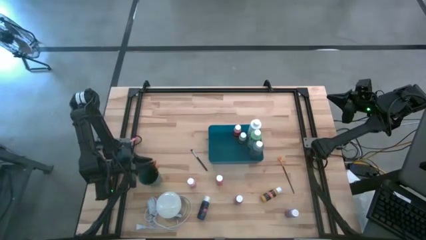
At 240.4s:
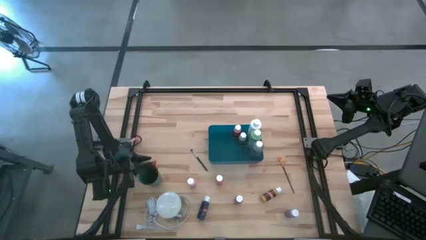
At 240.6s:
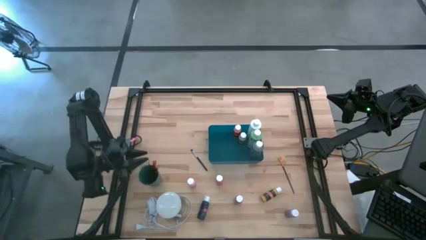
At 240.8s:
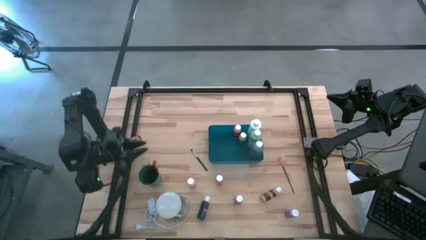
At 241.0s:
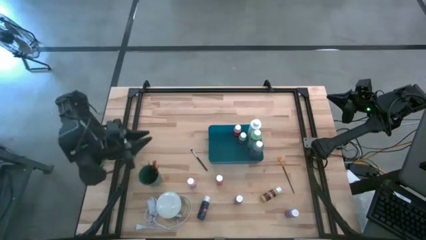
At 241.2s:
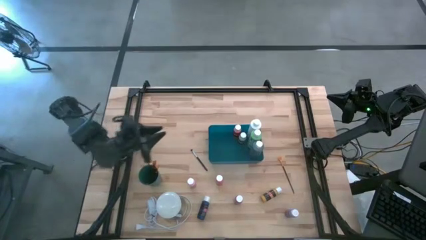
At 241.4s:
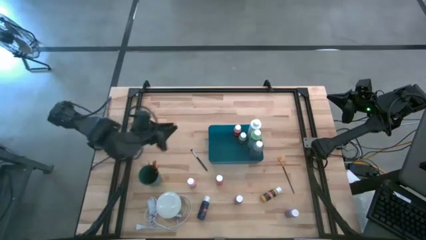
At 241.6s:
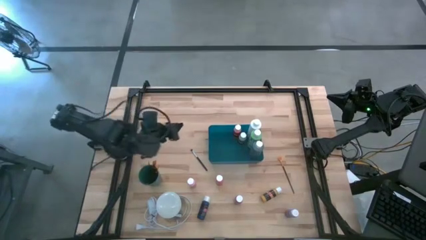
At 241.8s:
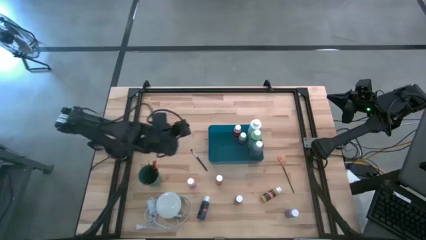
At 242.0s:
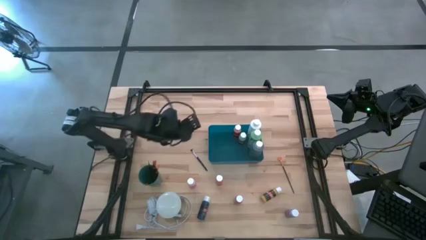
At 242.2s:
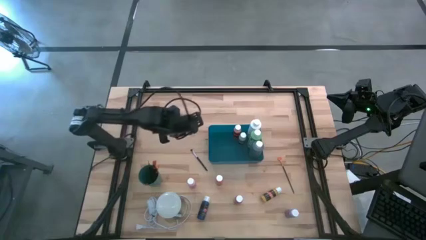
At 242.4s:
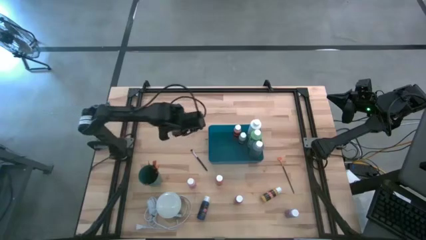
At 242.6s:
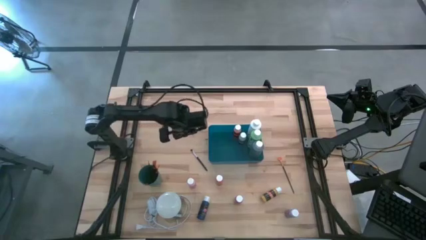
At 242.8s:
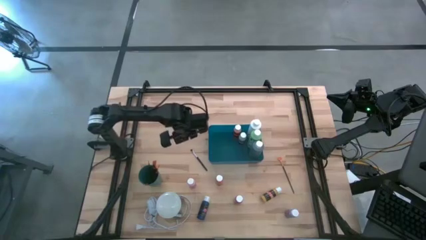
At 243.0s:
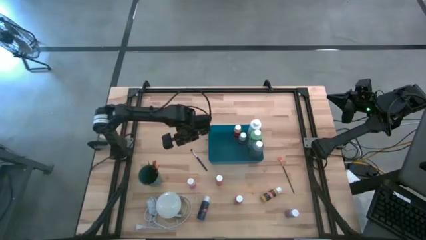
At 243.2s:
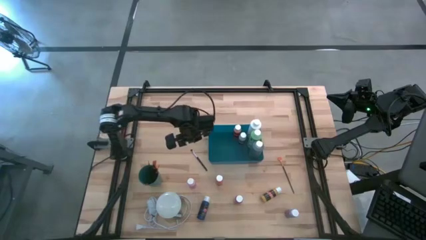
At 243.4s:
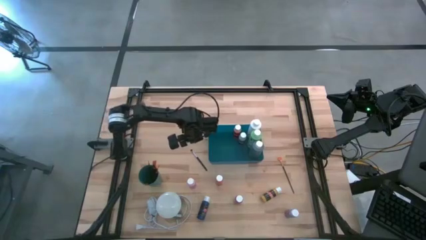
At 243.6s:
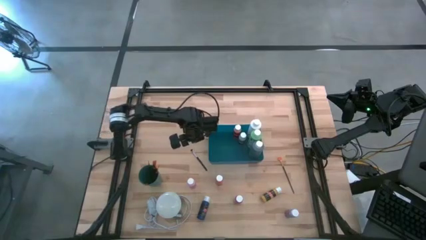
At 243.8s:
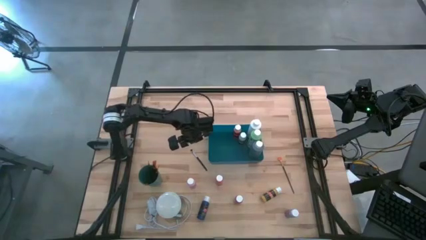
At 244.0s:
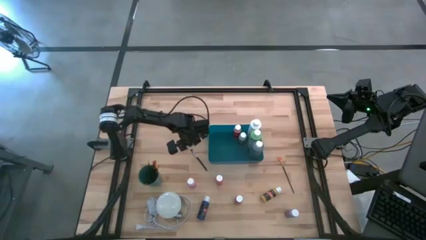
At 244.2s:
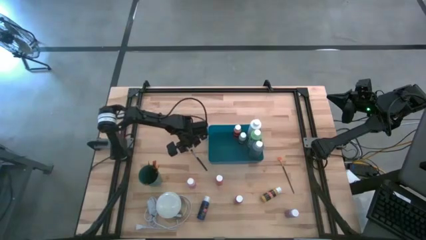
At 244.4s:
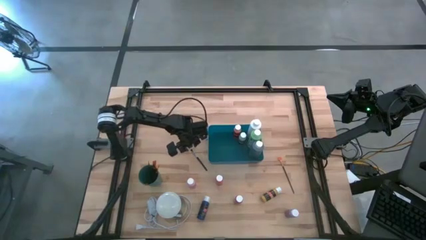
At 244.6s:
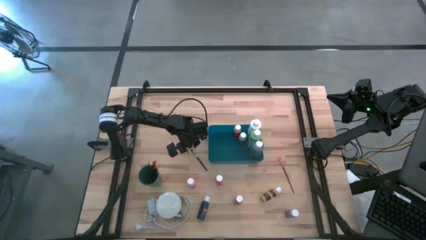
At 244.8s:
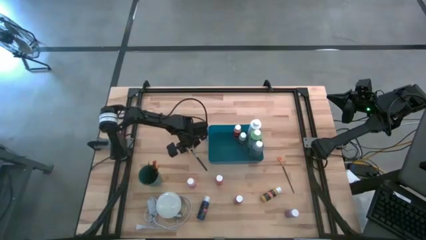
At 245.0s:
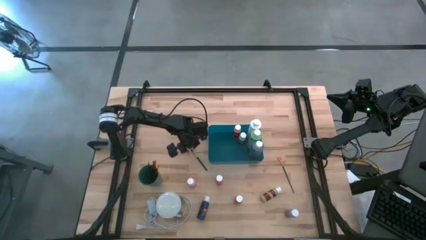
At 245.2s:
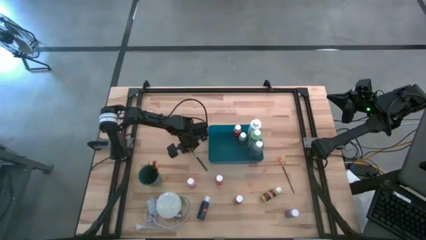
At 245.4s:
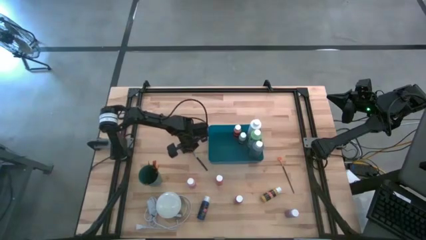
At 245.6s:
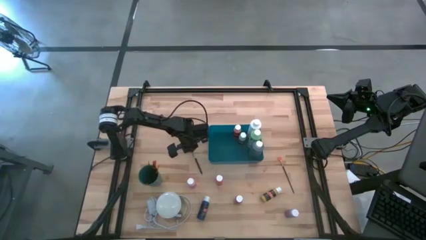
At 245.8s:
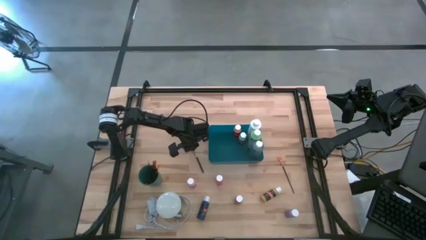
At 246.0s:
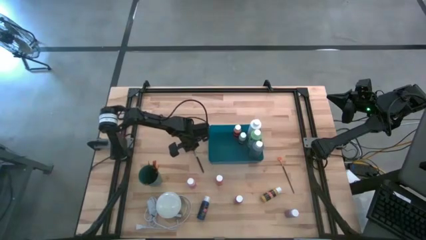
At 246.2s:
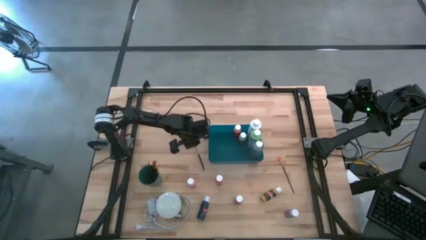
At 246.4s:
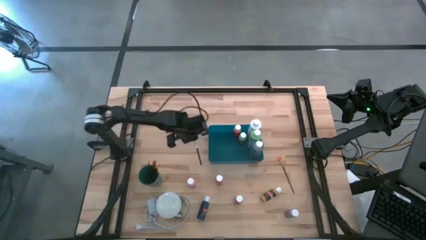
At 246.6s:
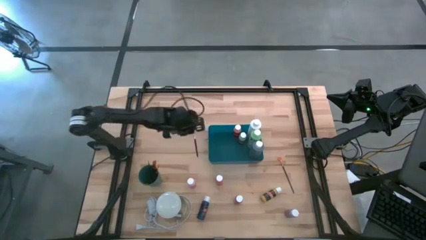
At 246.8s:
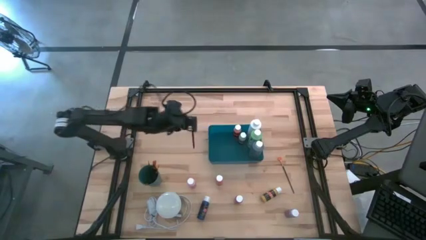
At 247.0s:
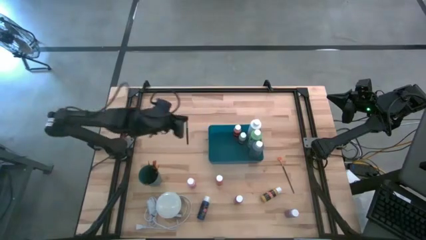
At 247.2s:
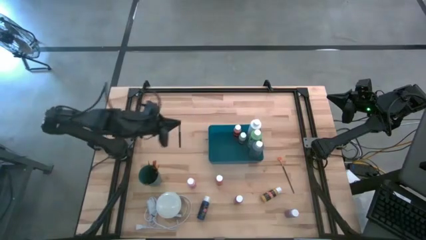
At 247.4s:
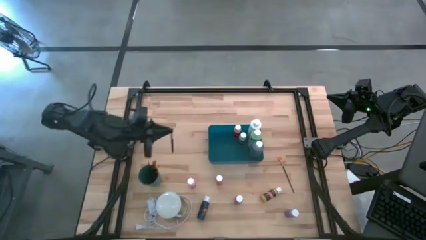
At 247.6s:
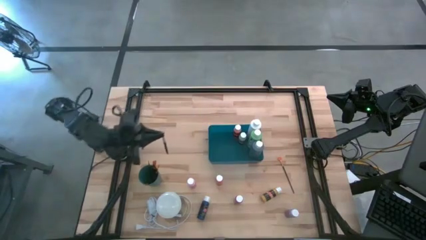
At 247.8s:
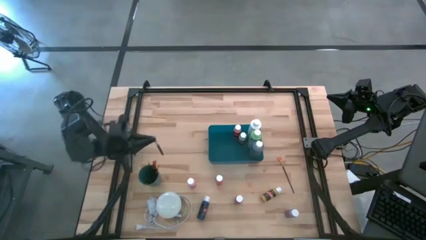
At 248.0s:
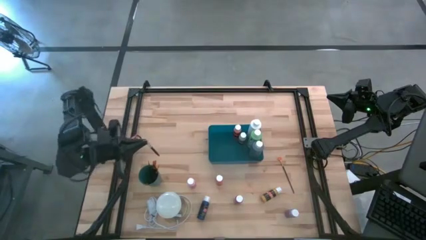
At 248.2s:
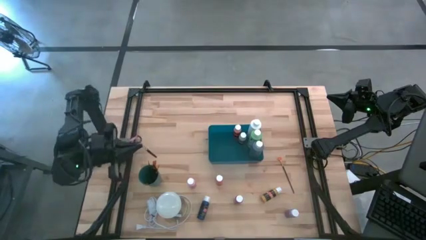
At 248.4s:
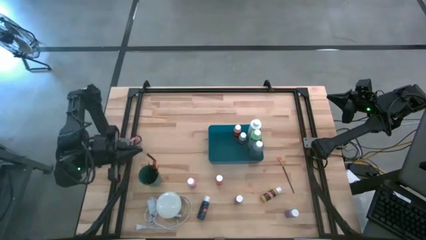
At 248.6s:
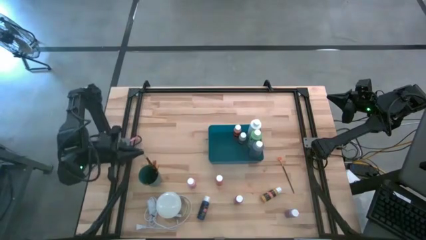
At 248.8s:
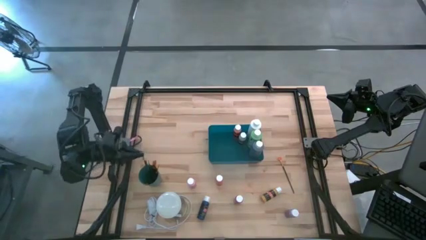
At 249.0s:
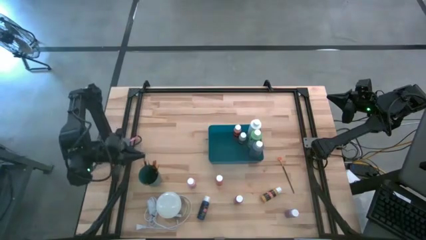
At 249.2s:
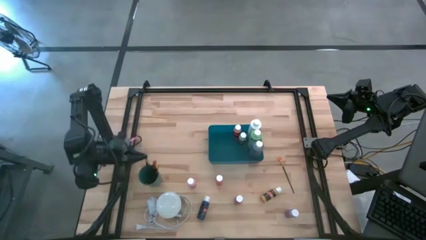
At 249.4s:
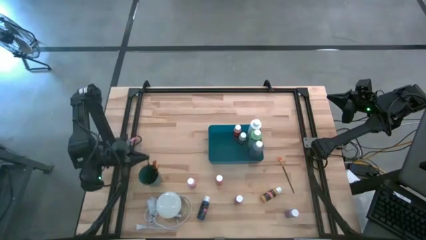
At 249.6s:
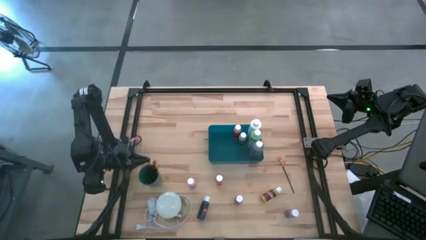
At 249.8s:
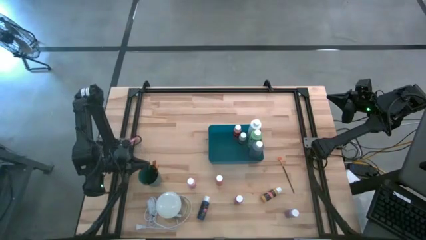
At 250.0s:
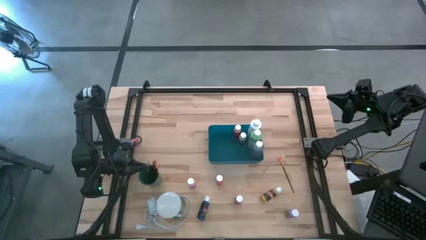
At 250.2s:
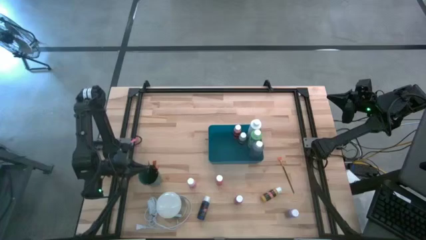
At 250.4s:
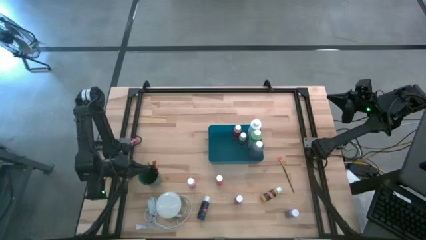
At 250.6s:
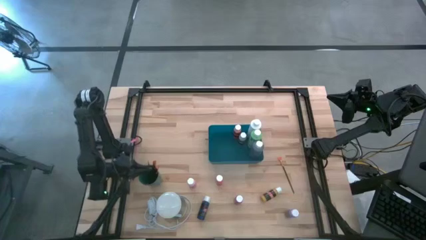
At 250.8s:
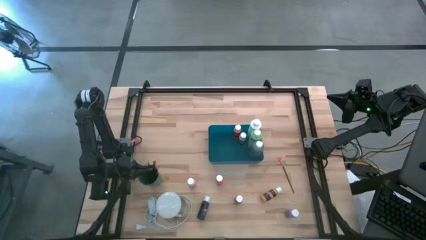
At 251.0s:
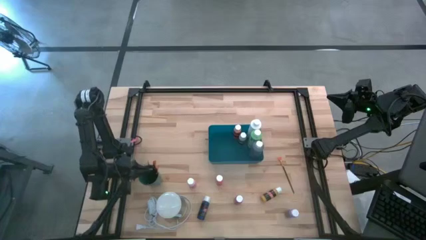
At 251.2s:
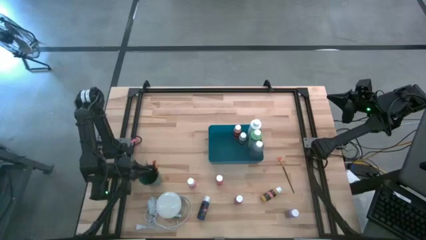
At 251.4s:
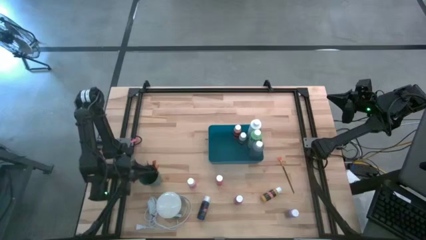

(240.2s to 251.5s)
Task: Pick & Place Paint Supplies
Put the silver paintbrush into the green cup

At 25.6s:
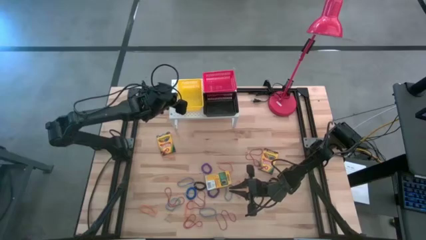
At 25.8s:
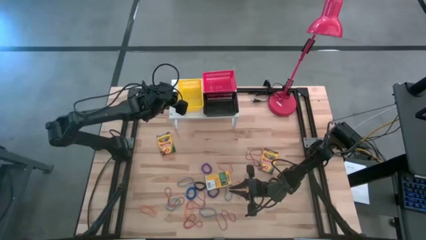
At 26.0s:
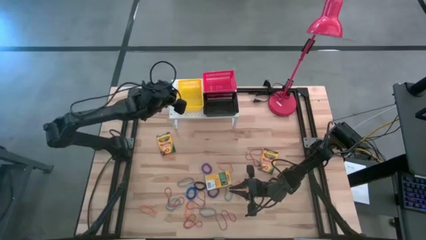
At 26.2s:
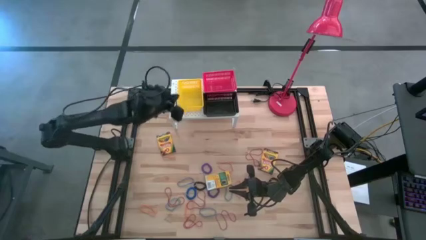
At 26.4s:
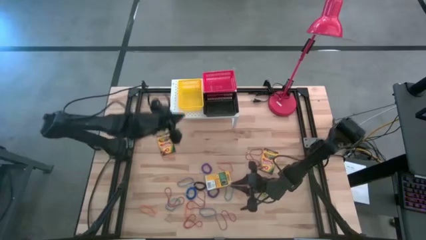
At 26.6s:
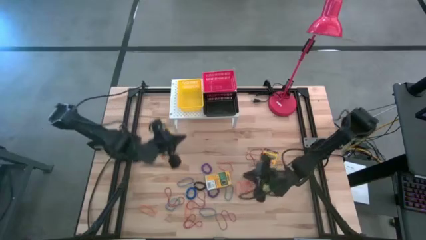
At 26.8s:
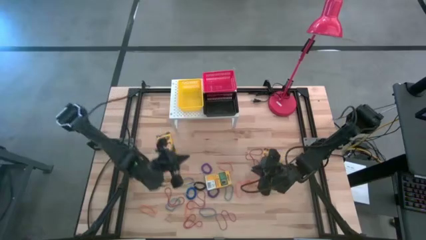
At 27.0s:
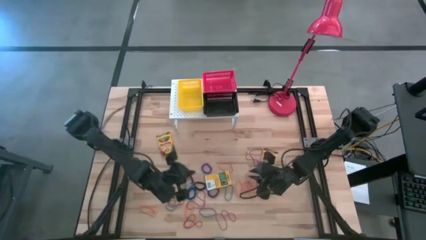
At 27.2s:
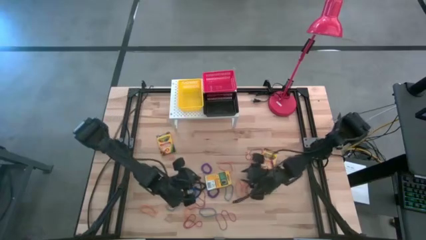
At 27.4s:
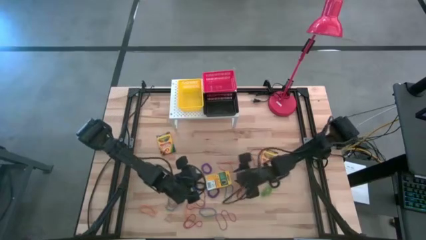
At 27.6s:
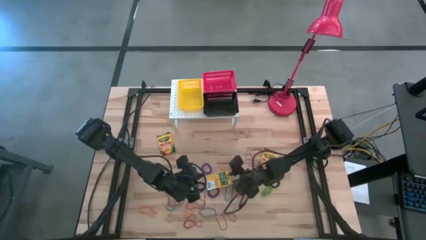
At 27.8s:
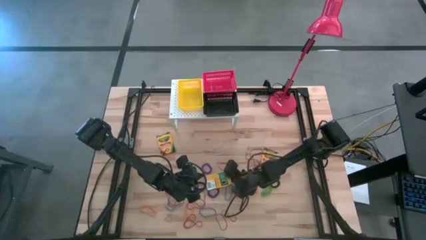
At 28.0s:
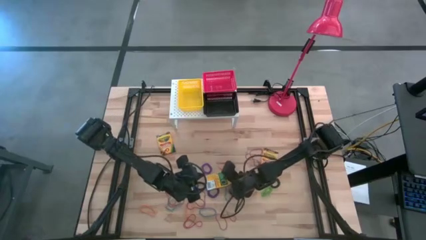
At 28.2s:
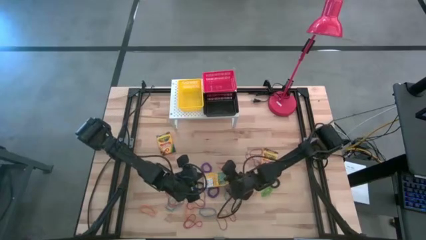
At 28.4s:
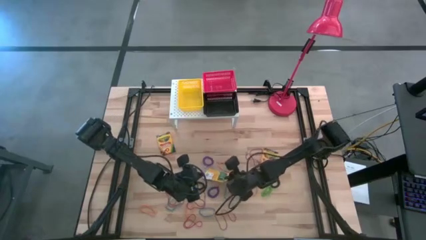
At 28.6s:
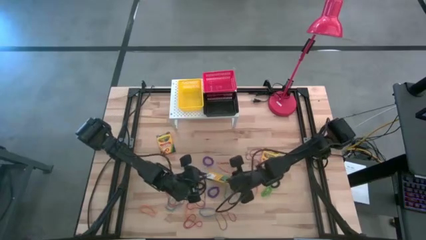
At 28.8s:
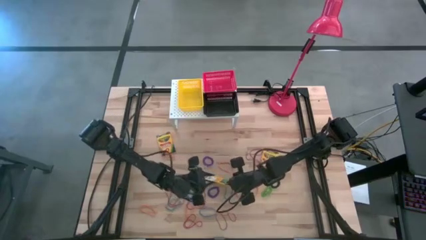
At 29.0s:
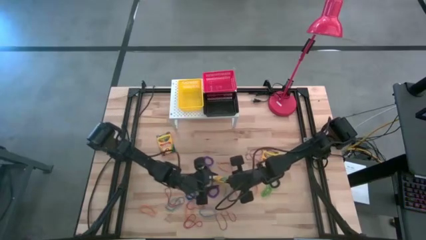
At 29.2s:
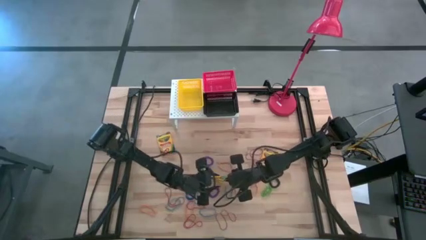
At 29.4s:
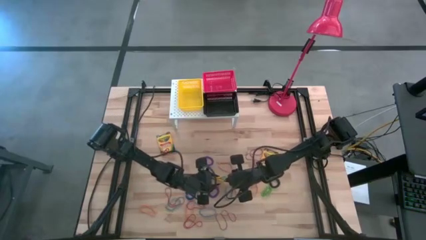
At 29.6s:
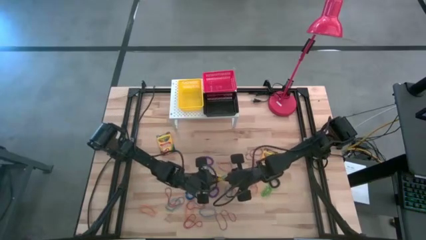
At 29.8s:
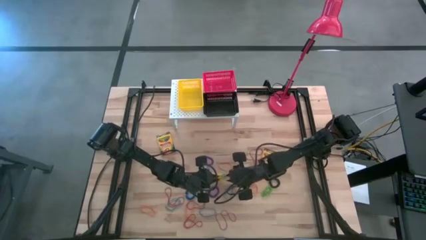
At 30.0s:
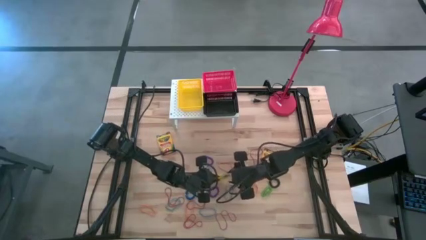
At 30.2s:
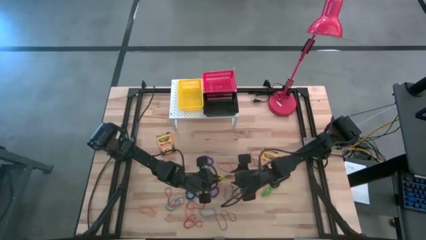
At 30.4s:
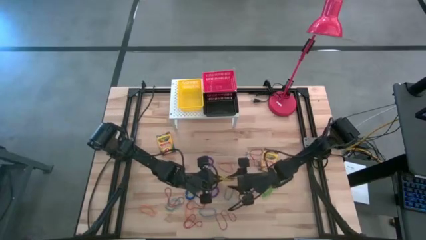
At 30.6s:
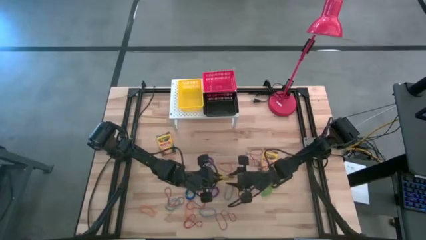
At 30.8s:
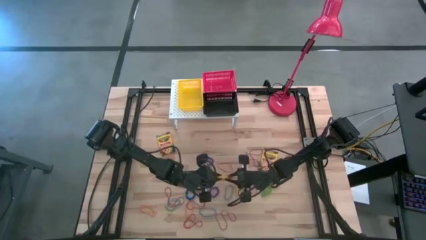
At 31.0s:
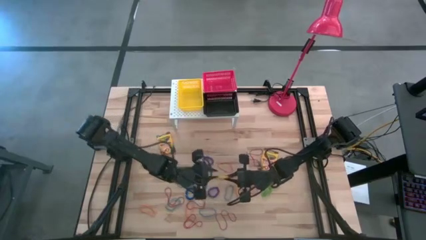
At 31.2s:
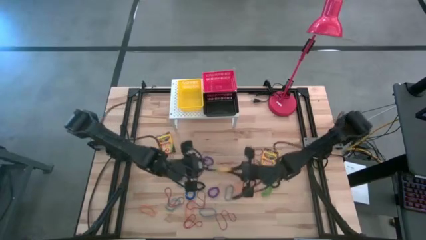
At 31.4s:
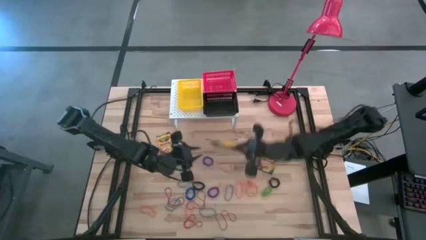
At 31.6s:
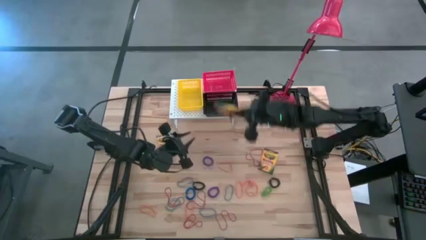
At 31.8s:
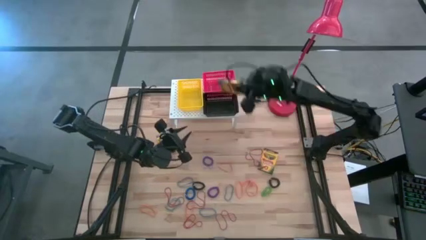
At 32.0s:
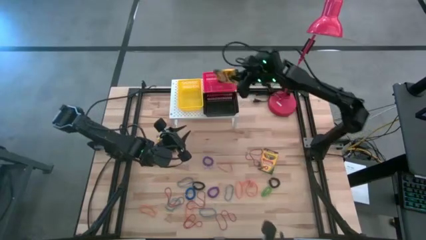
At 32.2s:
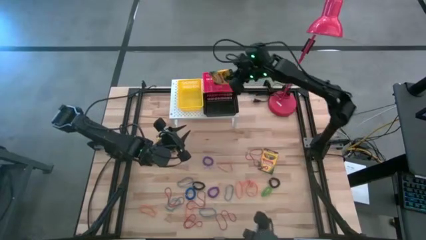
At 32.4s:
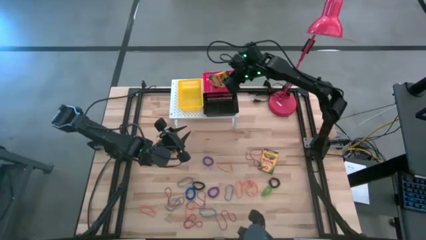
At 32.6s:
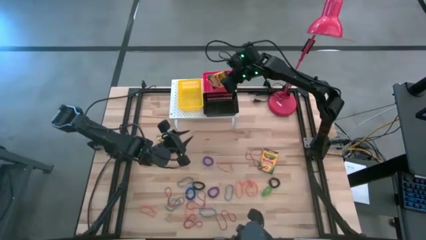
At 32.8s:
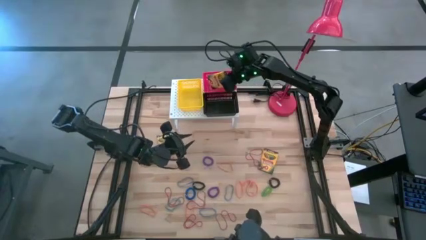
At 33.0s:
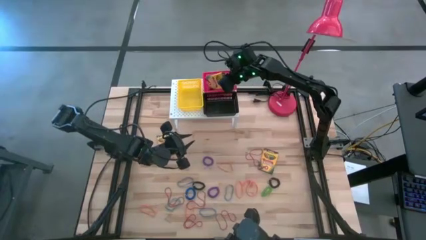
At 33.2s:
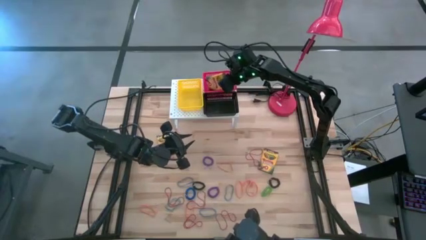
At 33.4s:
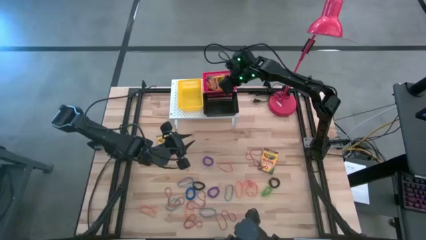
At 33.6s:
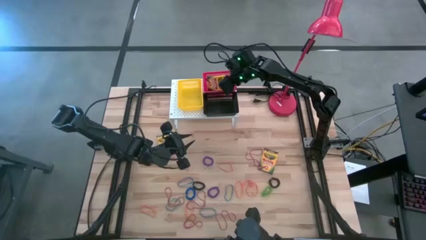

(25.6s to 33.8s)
Task: Pick & Place Office Desk Supplies
Put the yellow crayon box into the red bin on the shelf
